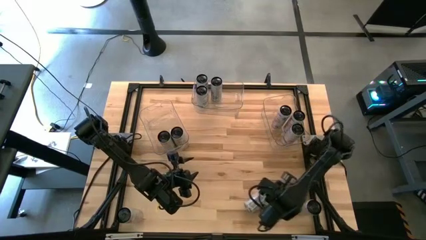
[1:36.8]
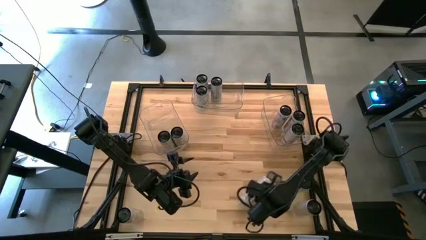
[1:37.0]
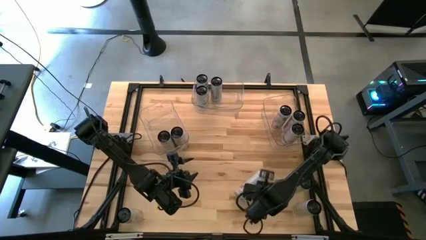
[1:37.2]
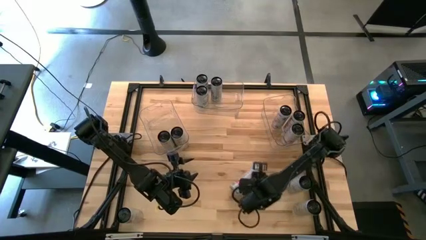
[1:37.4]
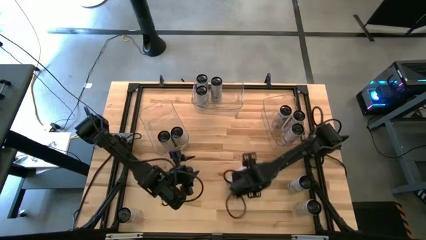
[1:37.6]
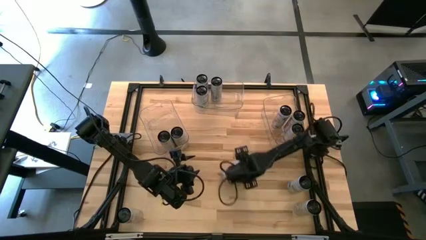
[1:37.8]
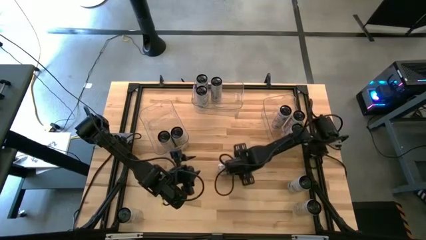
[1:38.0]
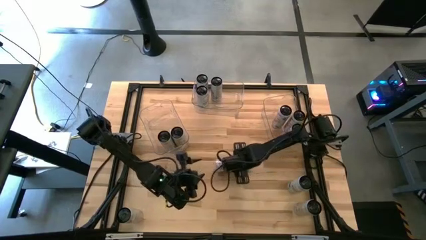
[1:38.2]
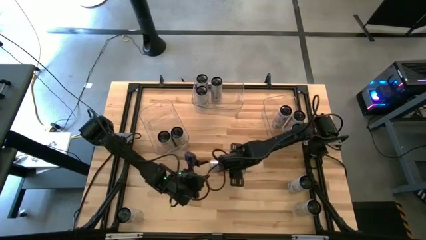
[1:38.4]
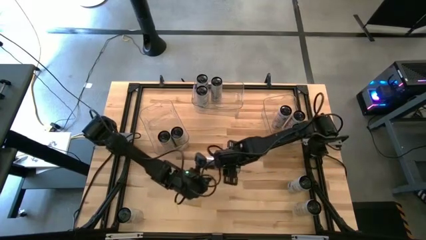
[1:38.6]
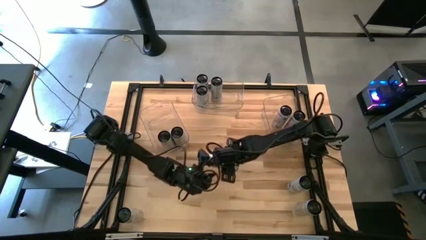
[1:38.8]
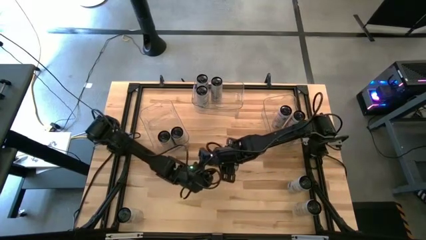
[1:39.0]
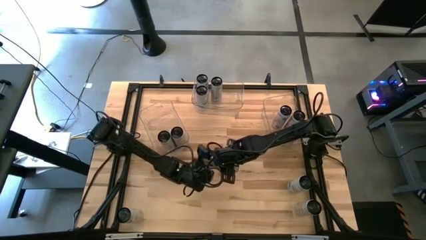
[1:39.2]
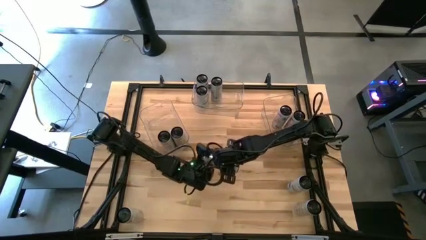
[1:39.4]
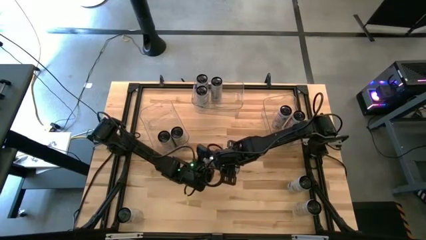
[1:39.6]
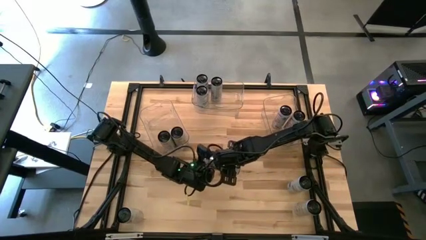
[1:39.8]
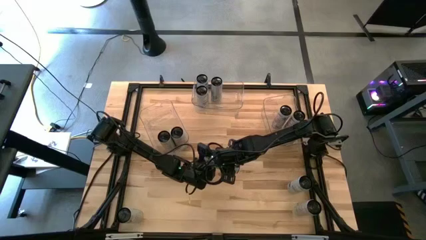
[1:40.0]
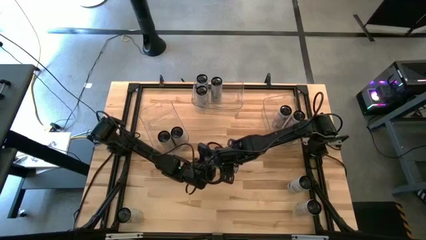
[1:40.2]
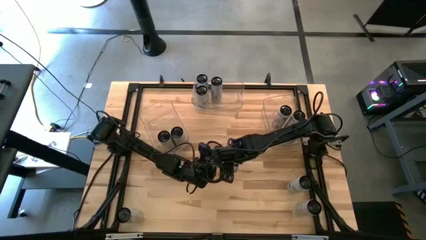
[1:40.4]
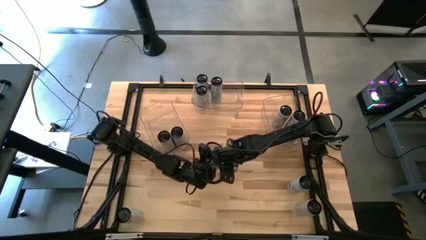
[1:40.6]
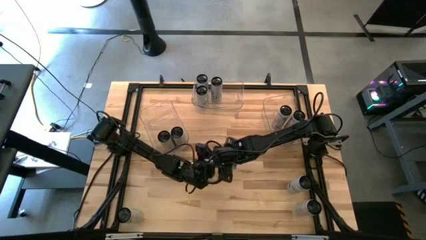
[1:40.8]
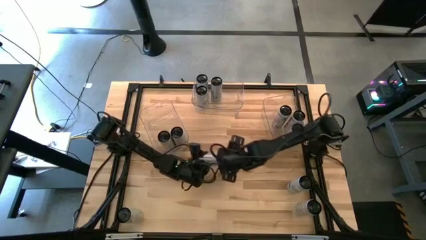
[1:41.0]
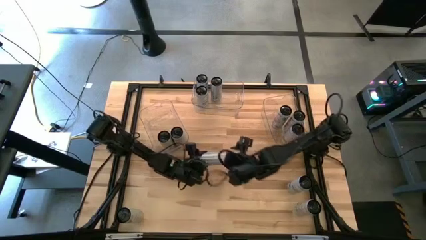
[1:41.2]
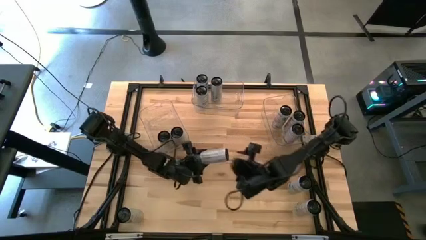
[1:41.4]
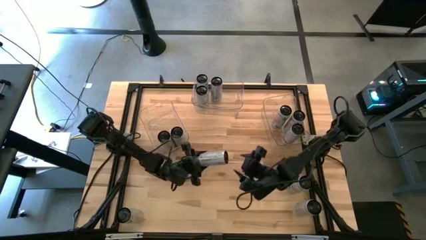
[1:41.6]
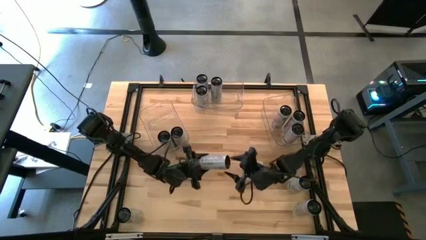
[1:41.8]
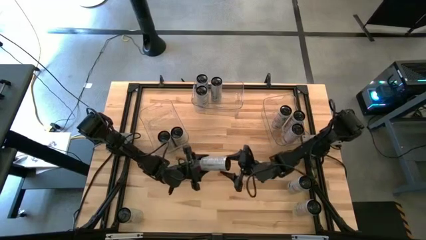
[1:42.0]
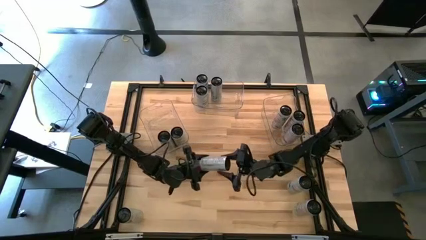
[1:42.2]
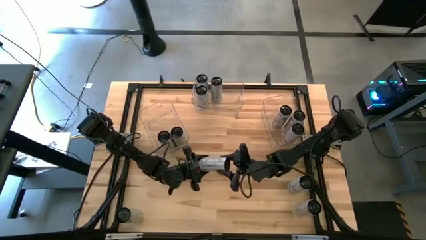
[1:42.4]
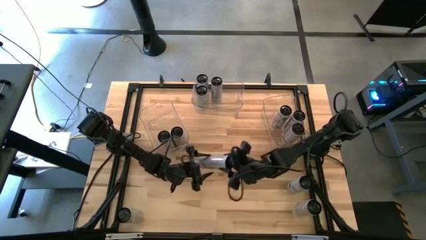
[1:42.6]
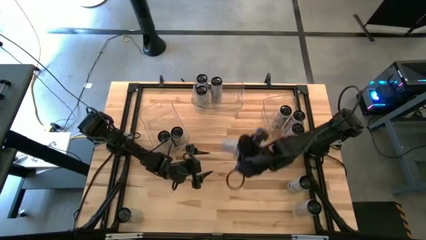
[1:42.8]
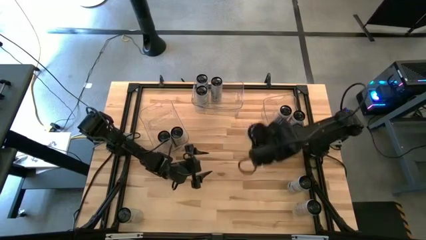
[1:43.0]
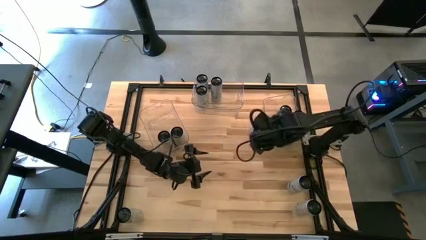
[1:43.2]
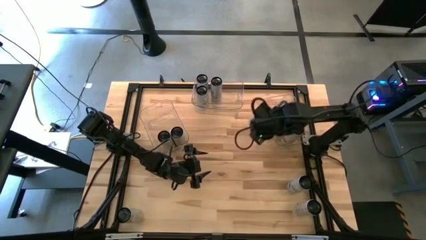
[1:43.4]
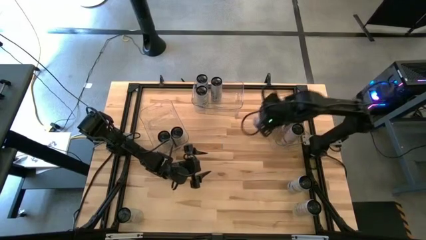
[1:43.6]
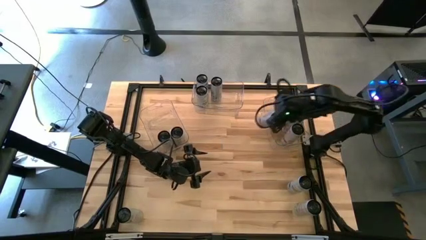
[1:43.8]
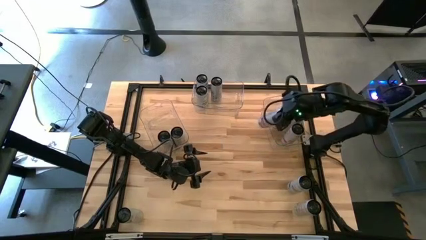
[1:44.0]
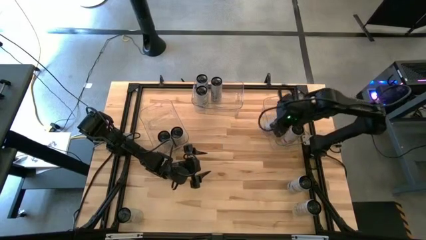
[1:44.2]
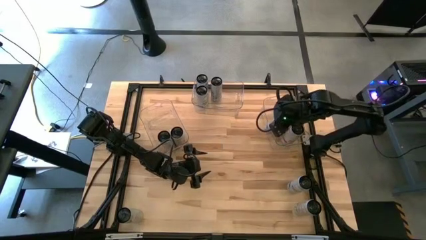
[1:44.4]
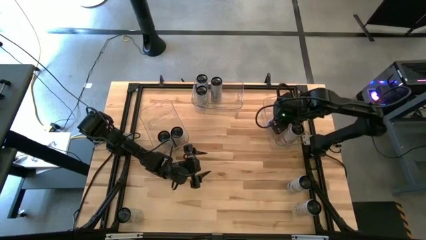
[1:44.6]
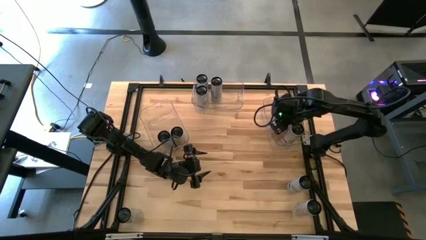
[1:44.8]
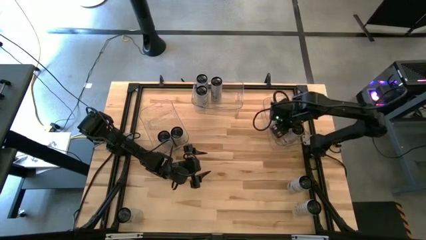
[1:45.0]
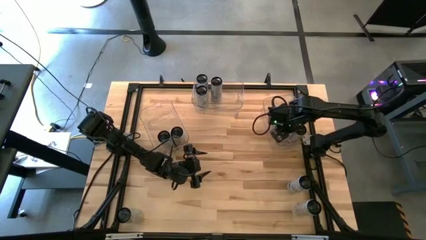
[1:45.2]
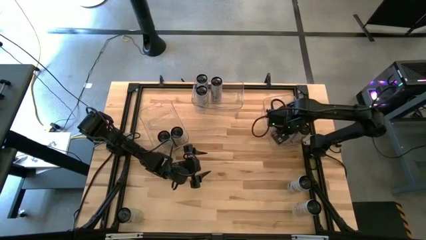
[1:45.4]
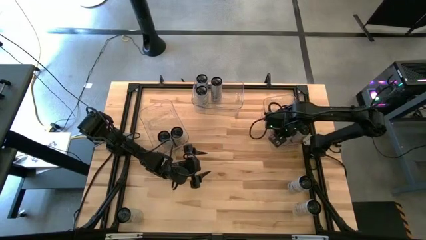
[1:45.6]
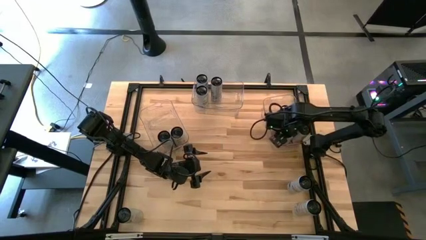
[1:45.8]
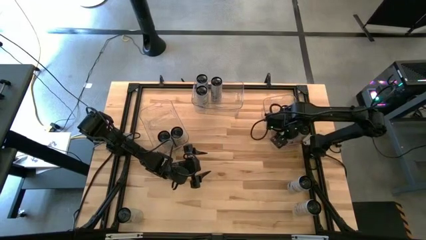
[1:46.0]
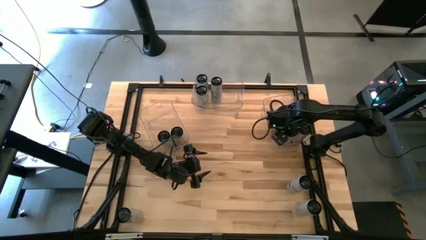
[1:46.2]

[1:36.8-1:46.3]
Task: Sort soda cans
Put the white/pink soda can into the right transparent bin

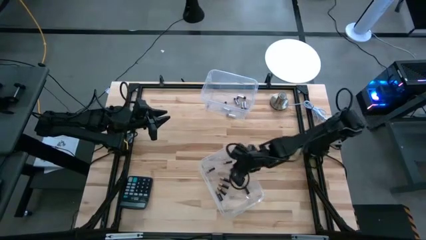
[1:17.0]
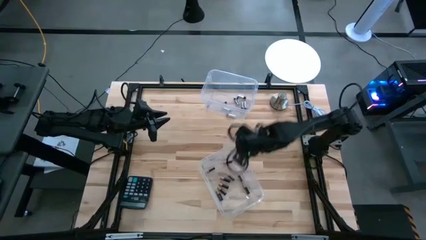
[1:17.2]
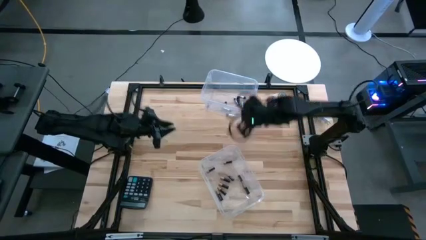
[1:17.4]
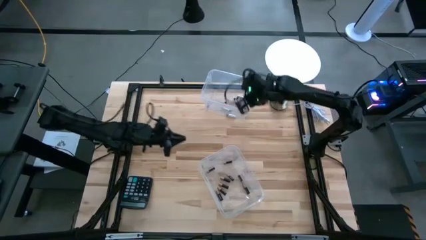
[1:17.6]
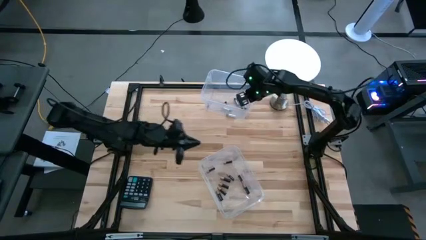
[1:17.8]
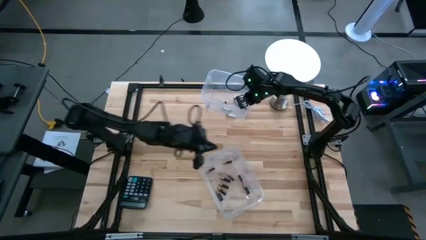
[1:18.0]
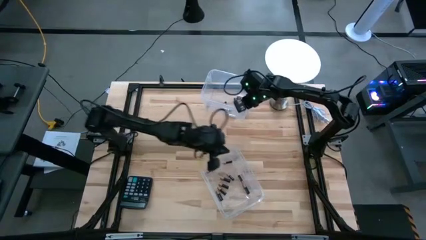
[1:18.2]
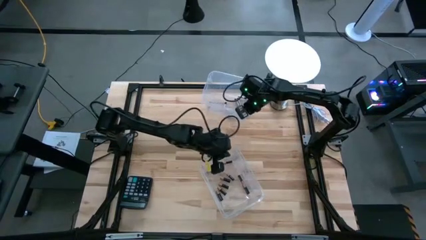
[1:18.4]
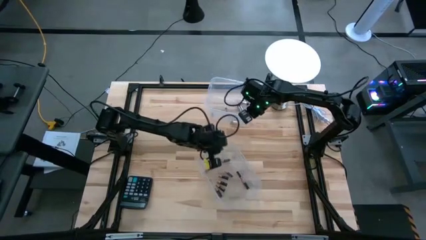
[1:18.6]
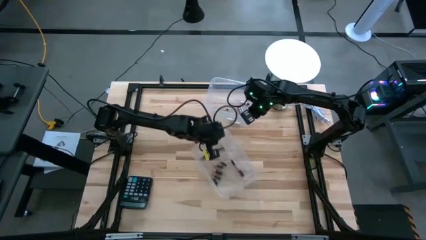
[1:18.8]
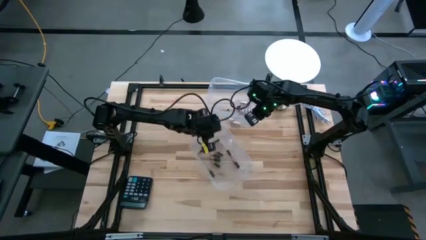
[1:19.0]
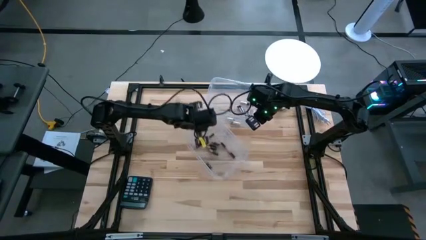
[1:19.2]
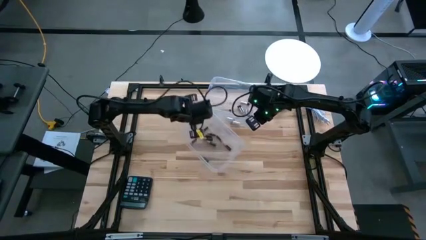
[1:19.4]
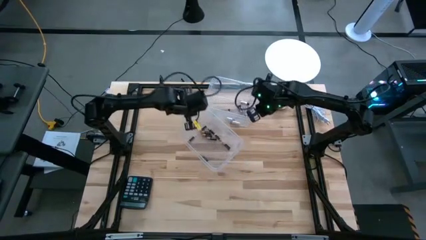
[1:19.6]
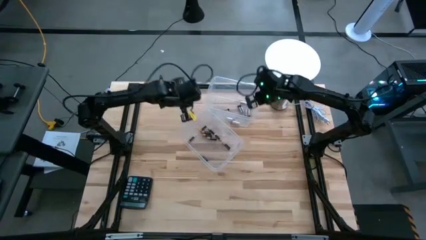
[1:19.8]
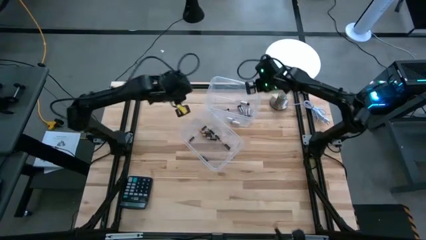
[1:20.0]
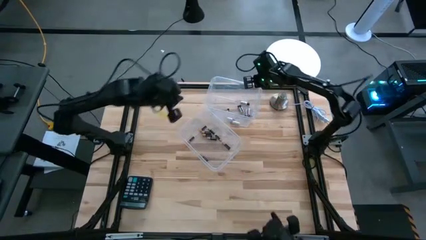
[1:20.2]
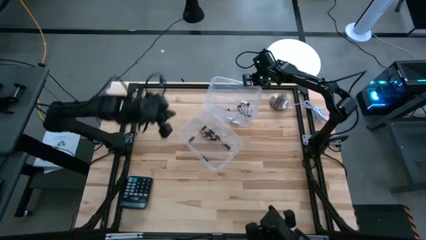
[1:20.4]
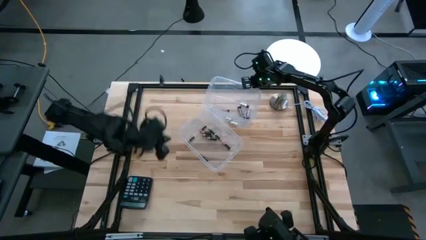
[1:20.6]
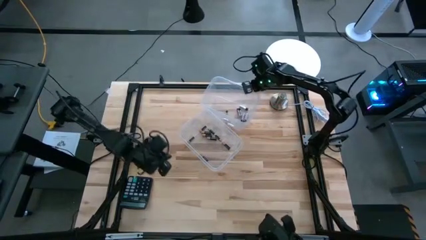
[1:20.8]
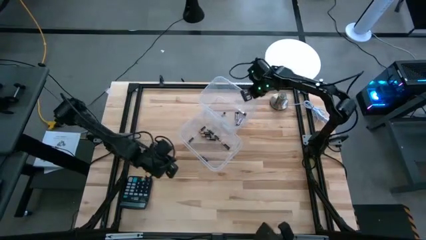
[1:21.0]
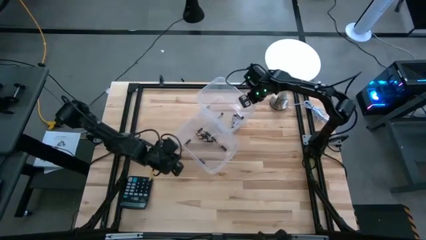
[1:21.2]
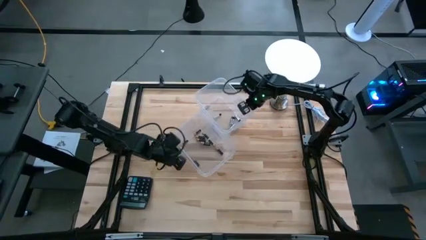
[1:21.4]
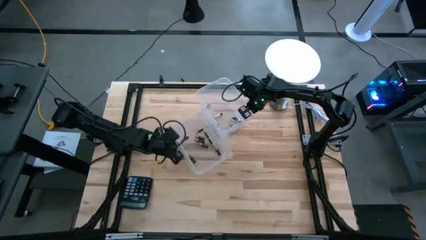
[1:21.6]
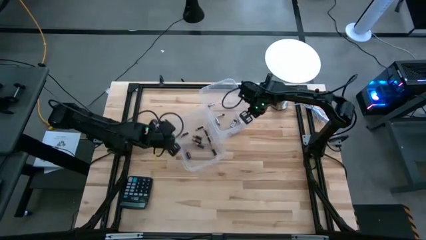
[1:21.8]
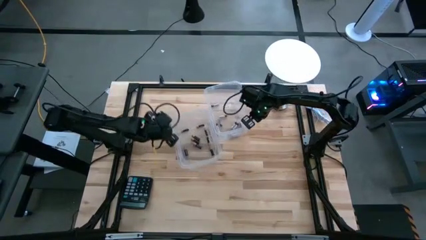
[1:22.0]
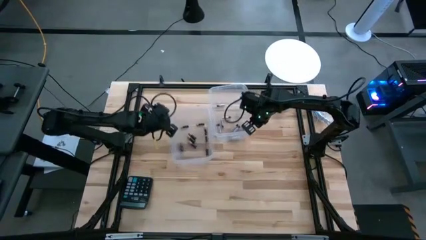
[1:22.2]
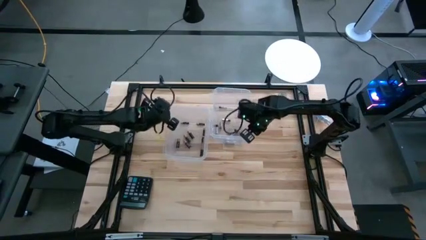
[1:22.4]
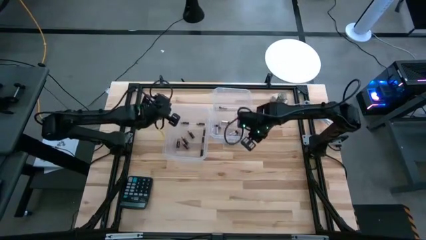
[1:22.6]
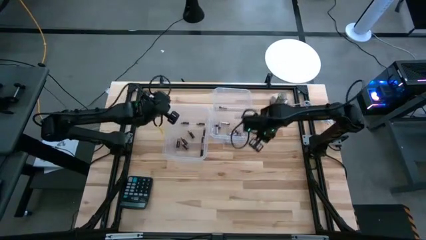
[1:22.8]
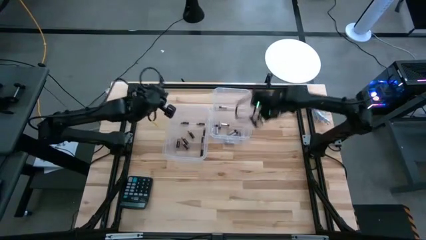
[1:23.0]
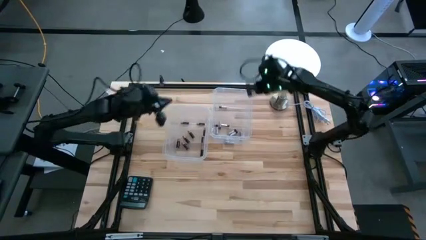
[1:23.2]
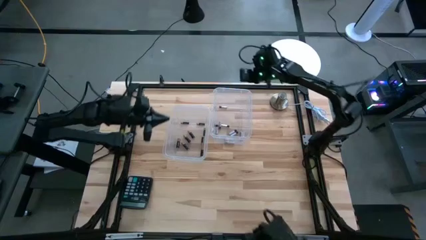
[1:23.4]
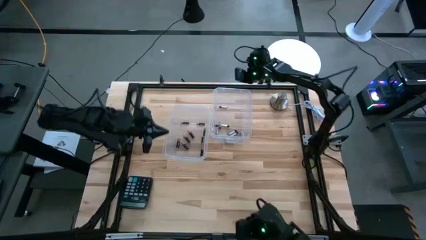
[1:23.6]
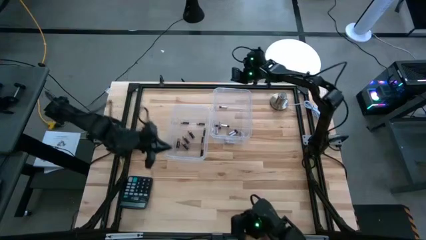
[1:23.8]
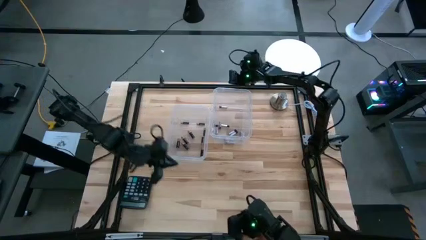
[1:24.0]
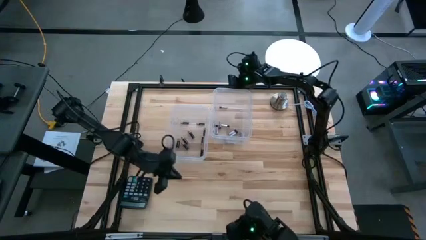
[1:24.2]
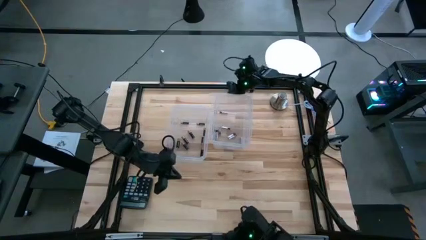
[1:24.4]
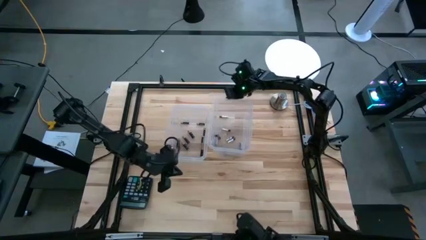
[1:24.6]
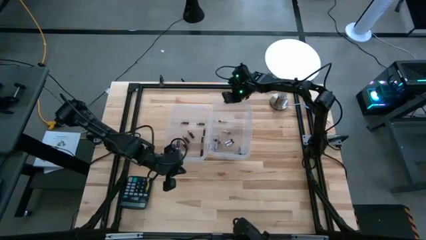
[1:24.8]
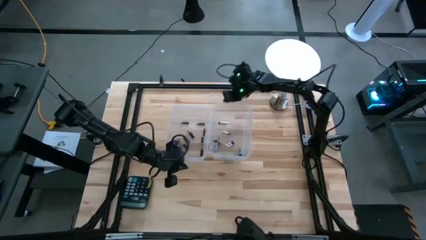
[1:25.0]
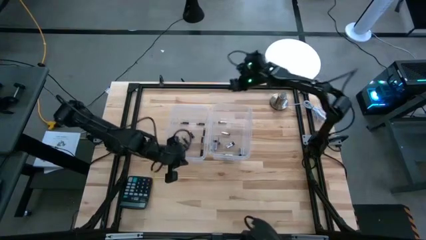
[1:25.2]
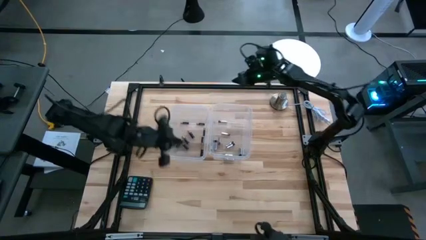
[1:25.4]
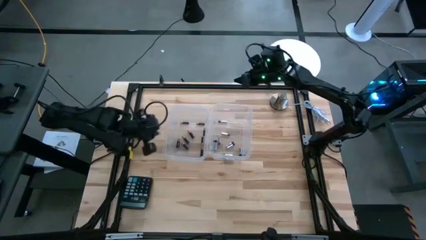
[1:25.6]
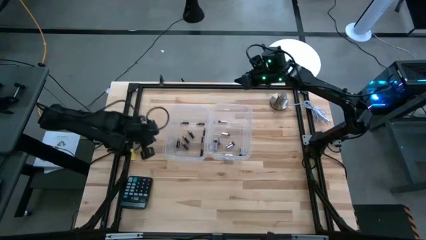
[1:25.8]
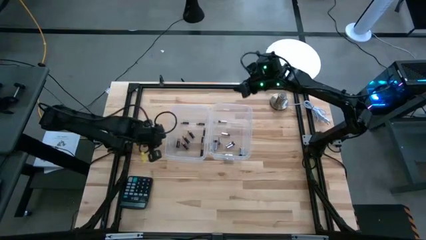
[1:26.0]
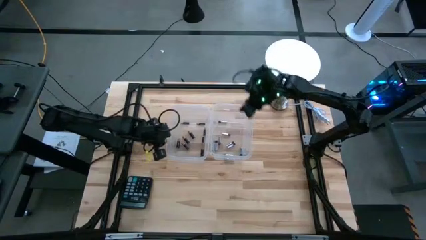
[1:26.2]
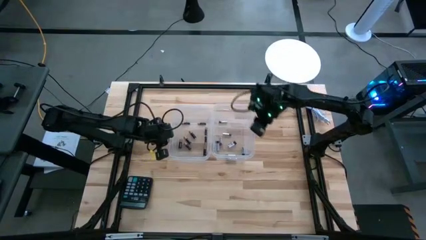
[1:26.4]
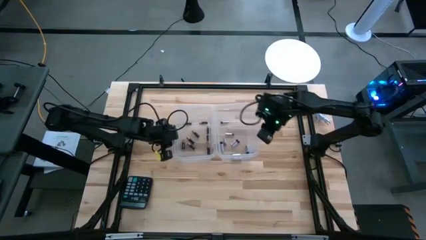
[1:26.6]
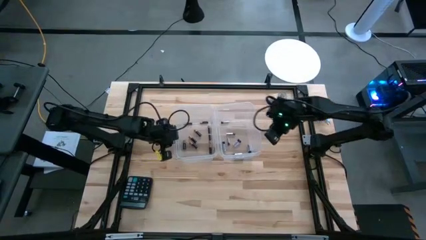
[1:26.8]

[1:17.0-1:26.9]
Task: Sort batteries
Adjust the transparent bins
